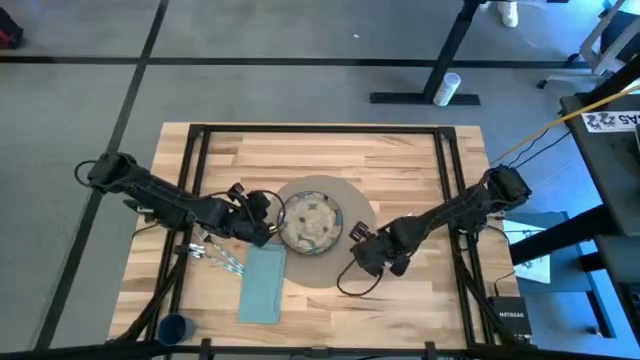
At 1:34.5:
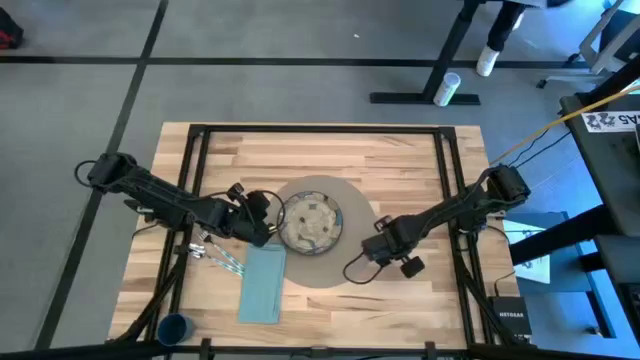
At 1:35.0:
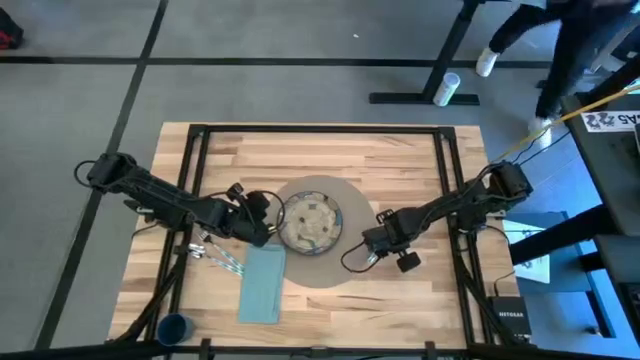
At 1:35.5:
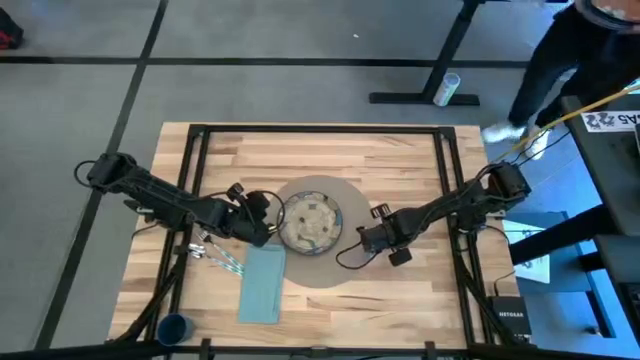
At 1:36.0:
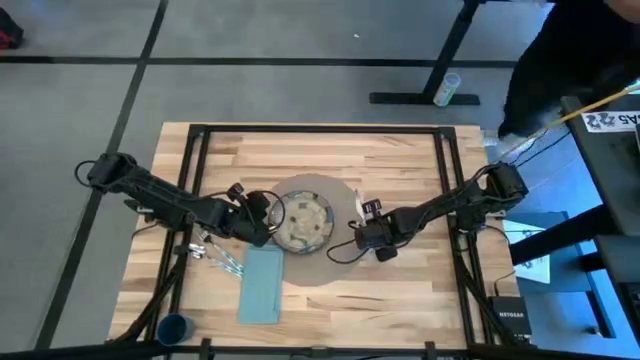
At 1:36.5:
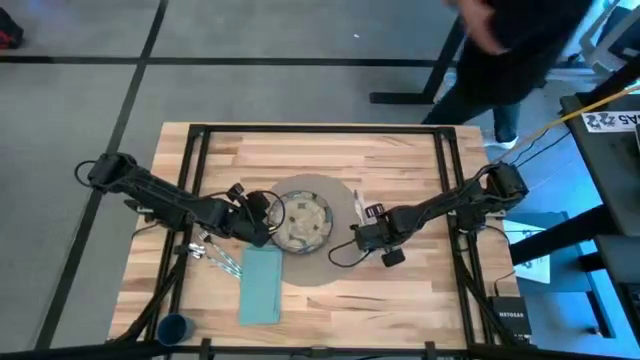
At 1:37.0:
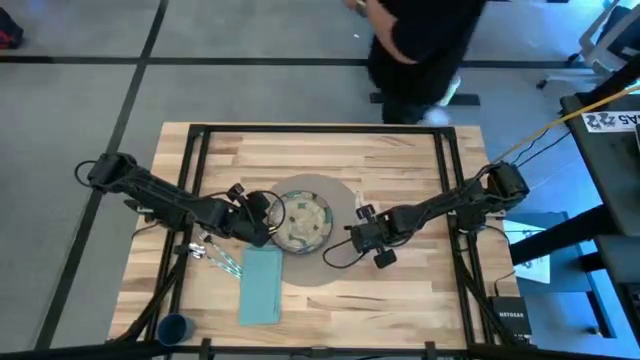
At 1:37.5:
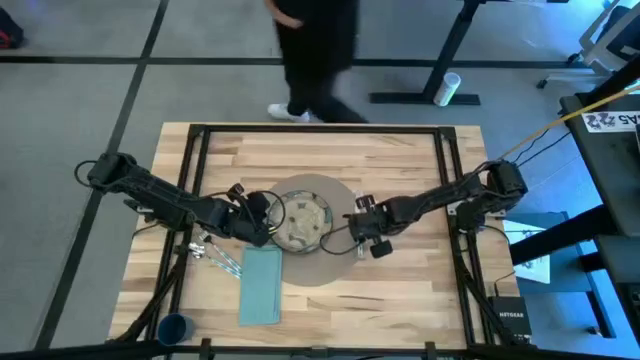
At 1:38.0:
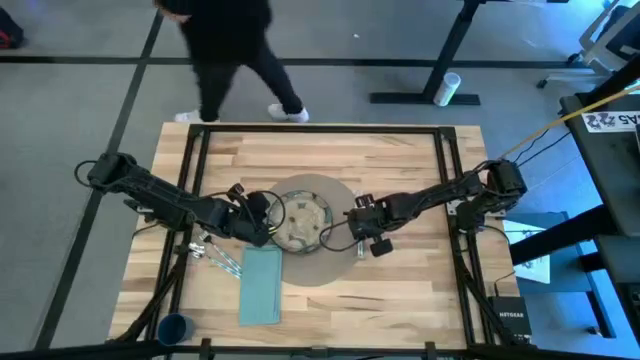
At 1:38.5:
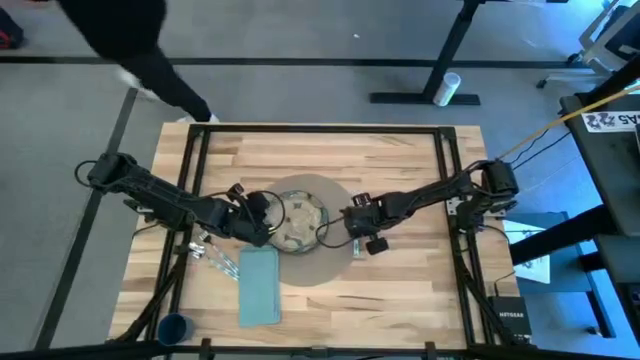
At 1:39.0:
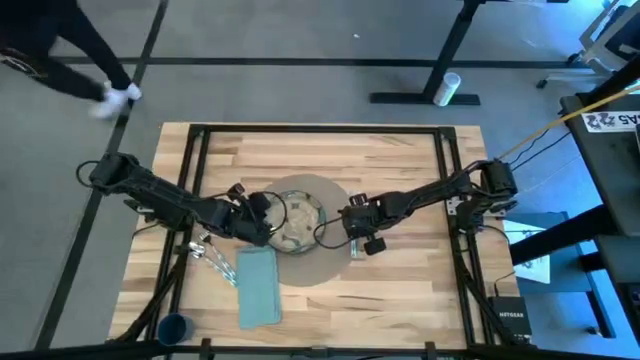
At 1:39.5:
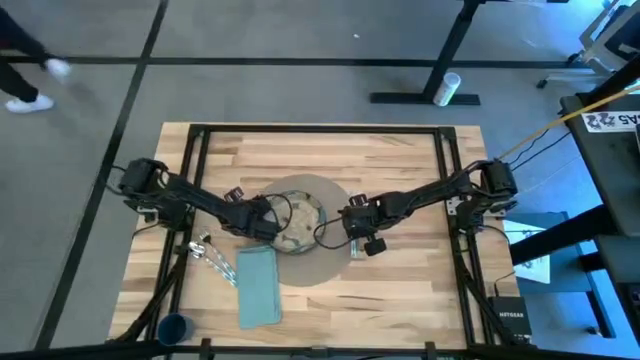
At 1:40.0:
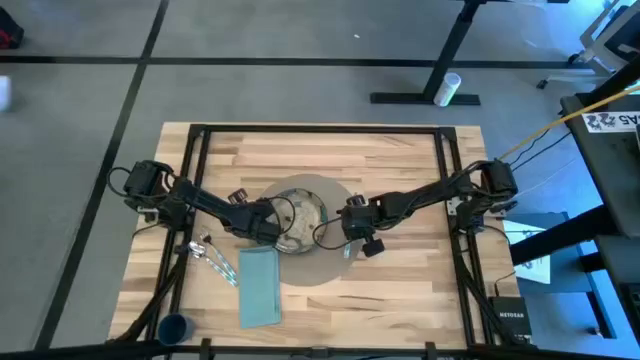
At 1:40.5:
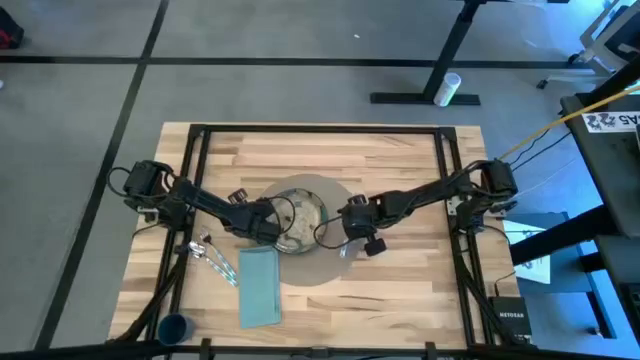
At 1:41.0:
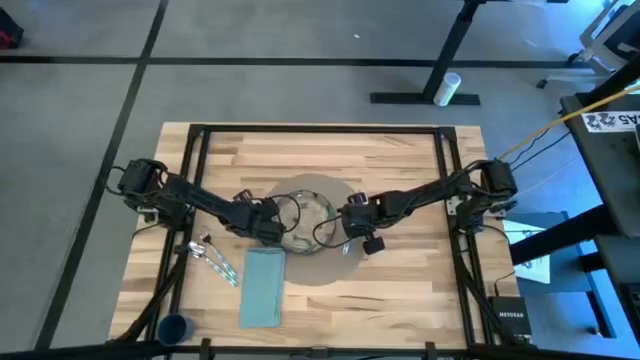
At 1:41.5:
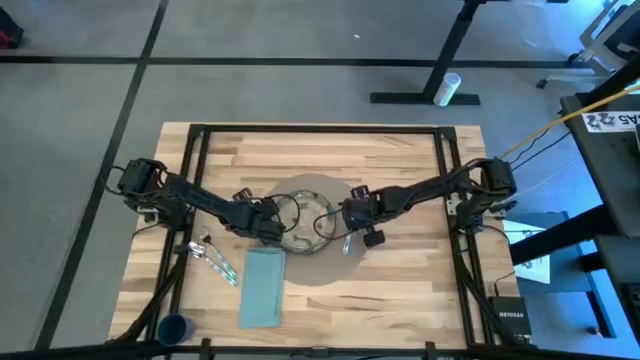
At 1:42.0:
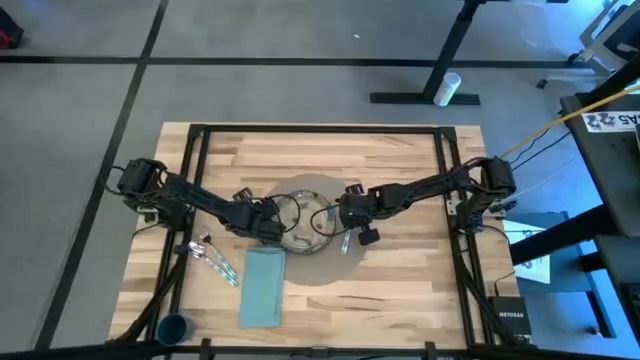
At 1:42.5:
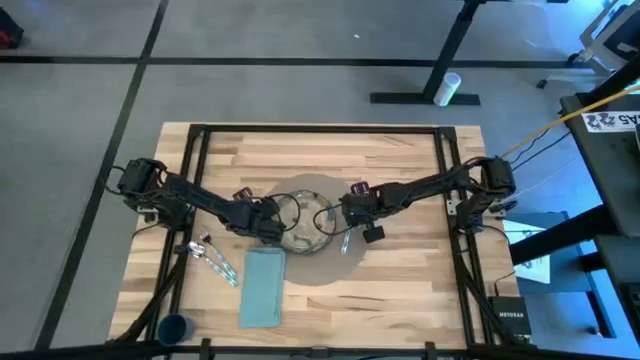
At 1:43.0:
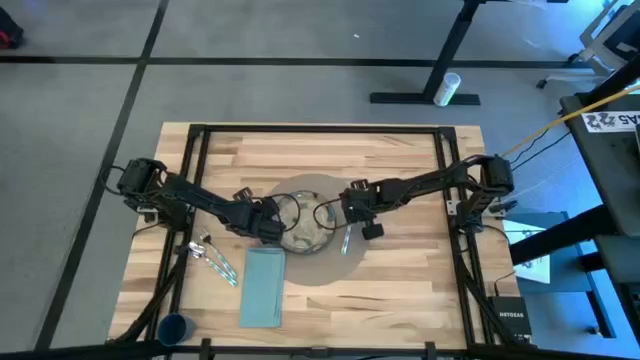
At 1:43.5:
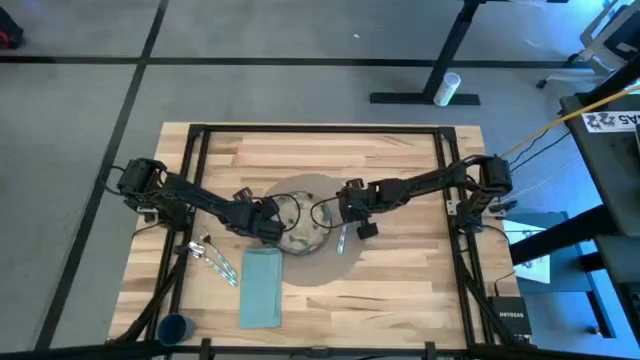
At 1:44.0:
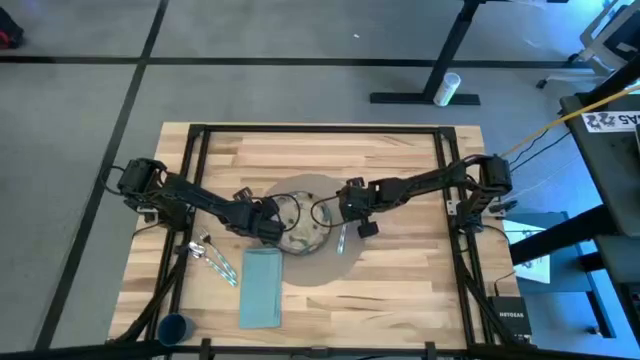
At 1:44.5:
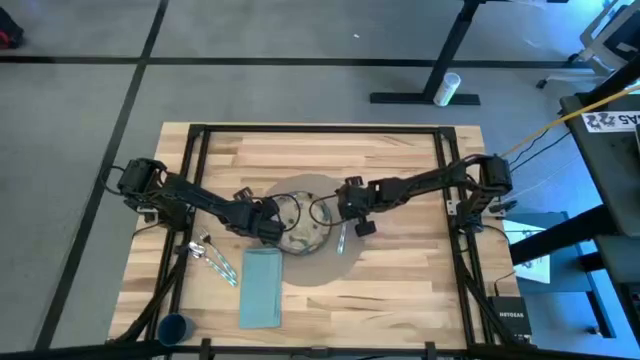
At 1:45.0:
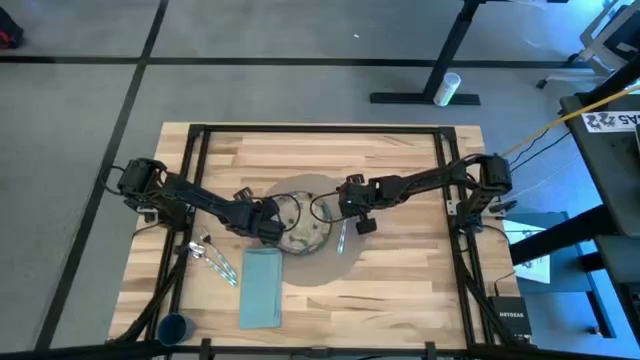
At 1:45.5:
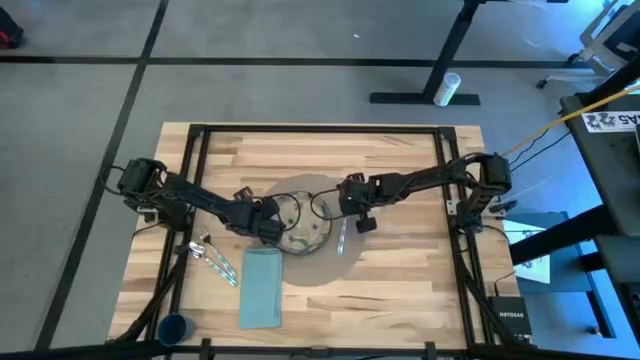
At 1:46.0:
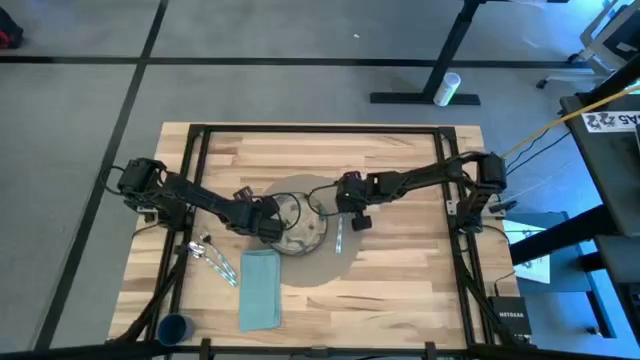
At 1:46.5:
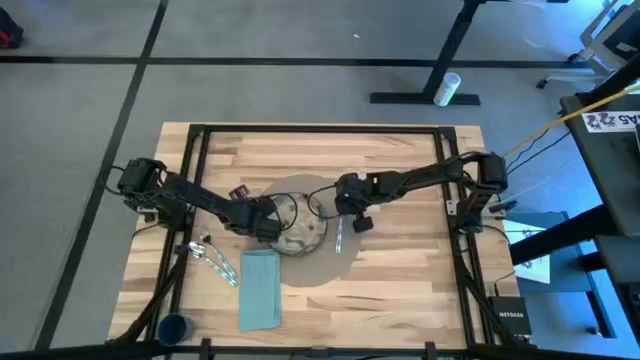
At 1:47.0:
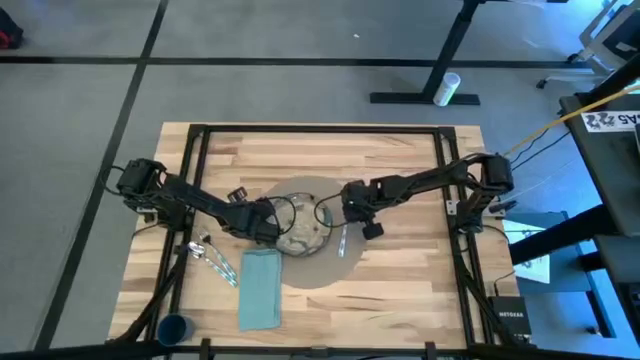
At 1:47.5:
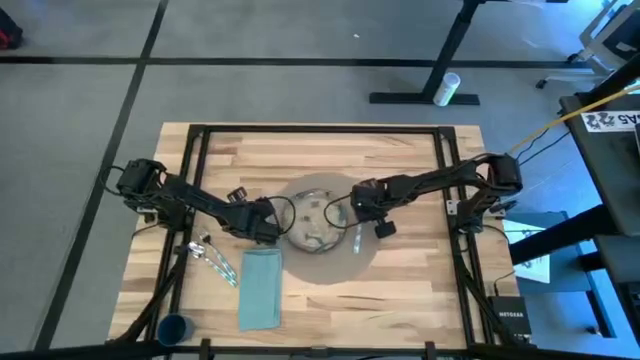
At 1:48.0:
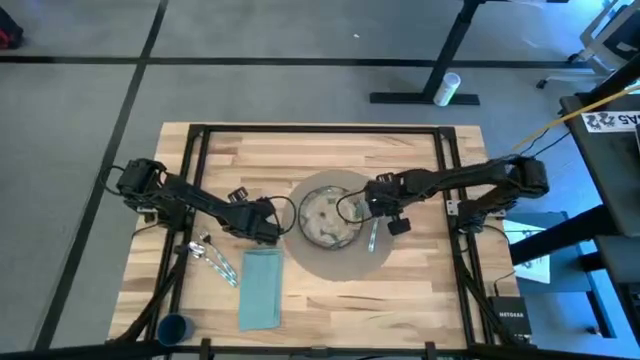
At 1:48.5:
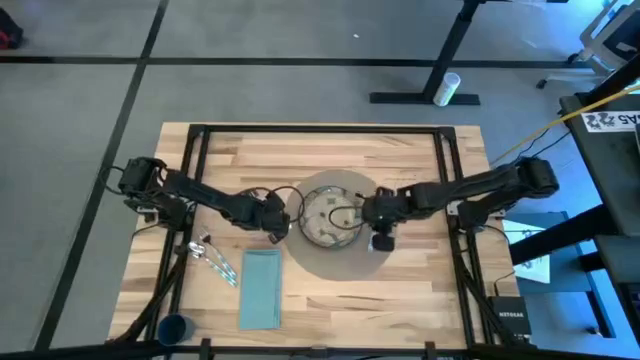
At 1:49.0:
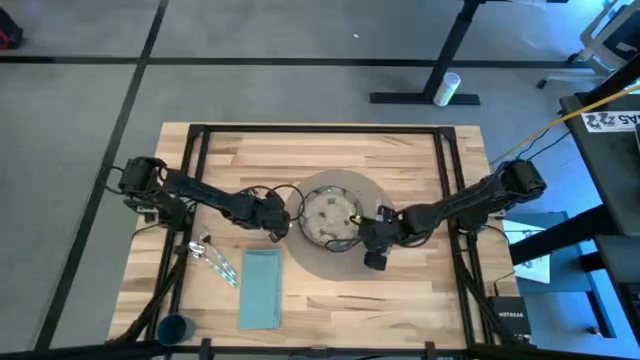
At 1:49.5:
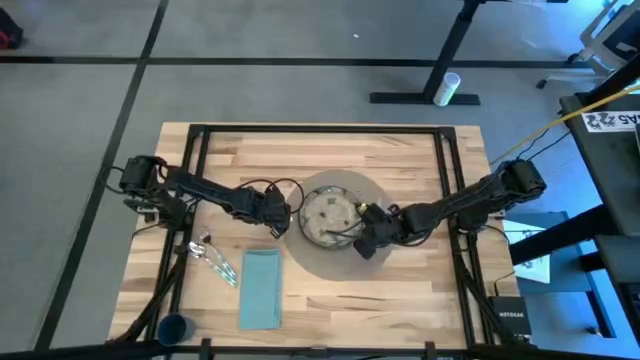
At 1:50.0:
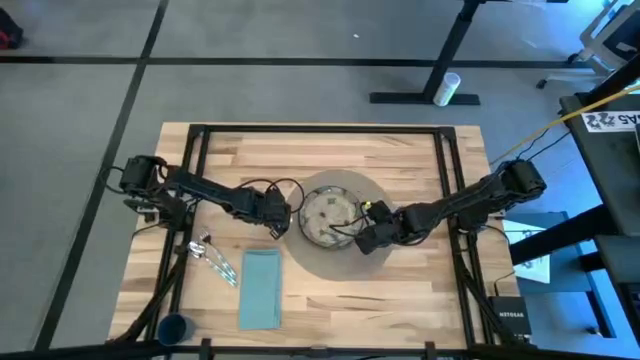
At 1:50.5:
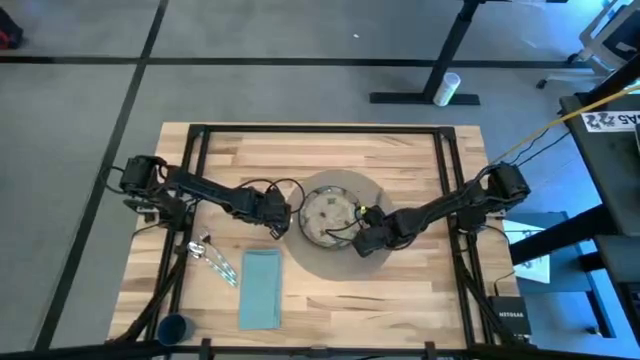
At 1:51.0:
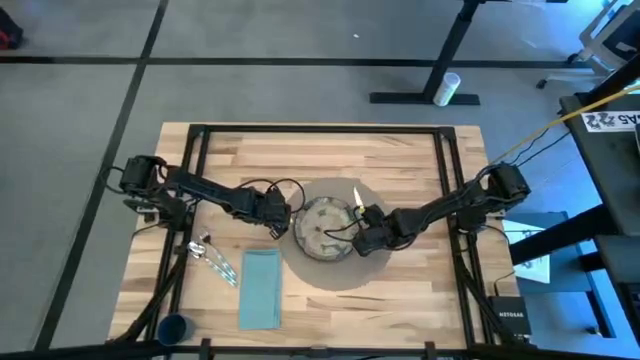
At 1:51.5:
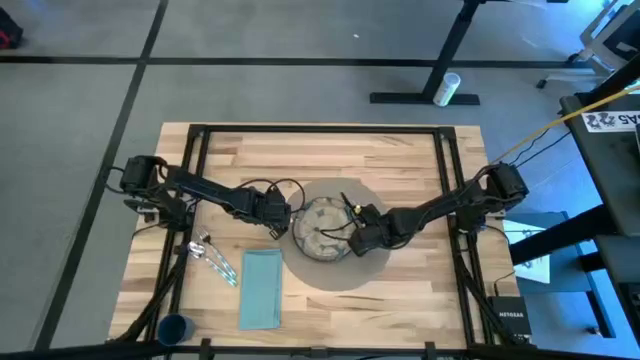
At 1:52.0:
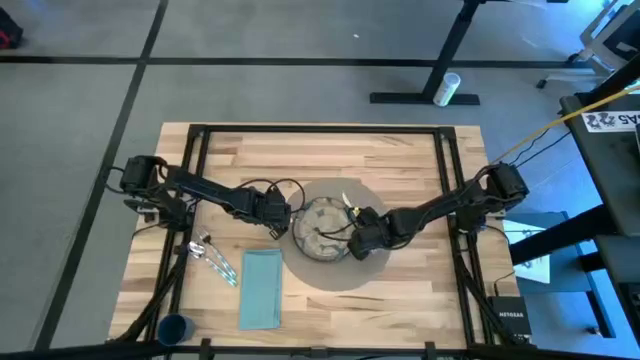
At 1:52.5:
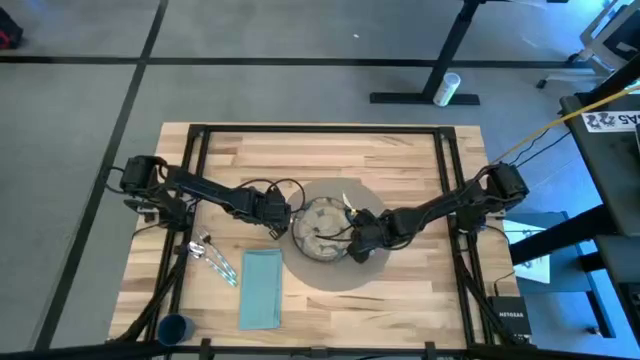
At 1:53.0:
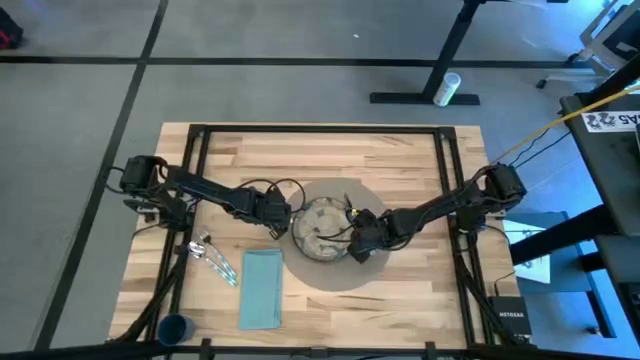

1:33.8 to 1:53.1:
Task: Set table place
Put the blue patterned table knife on the brown tablemat to the right of the white patterned plate

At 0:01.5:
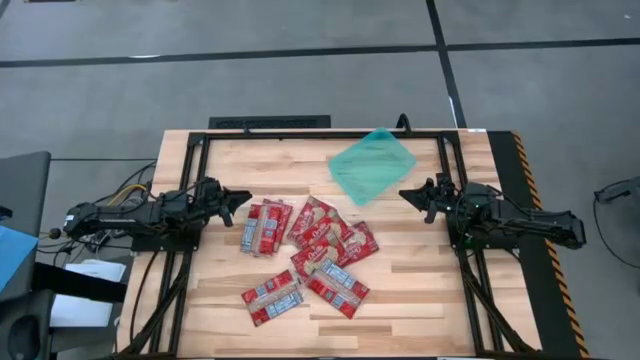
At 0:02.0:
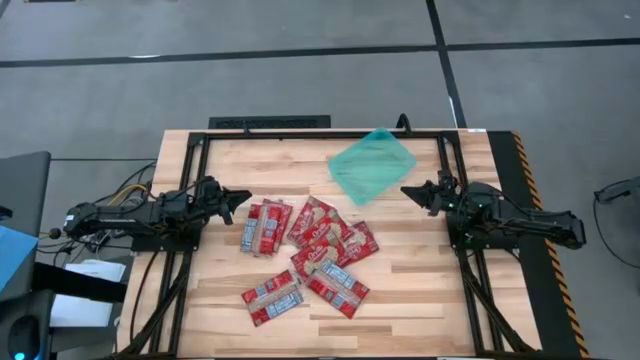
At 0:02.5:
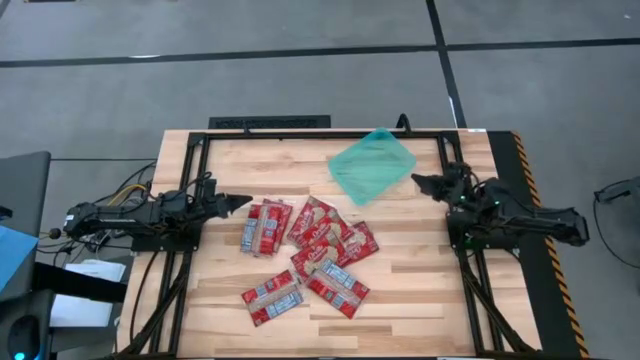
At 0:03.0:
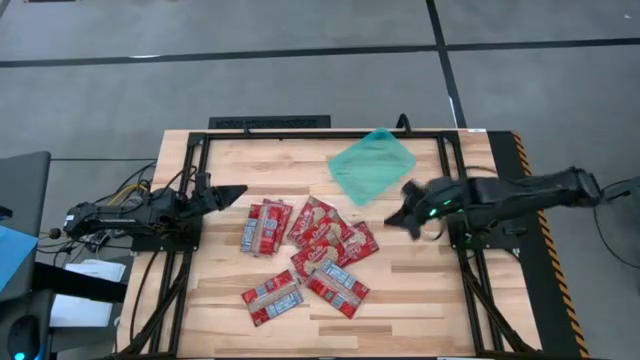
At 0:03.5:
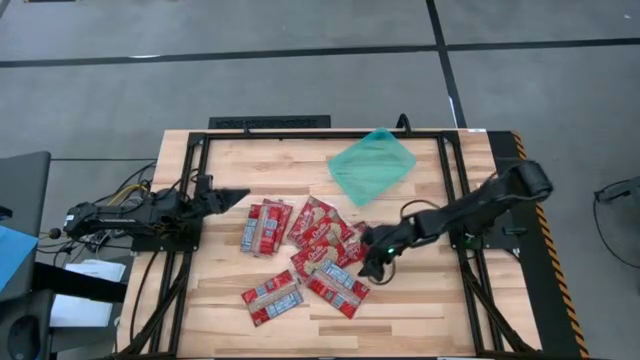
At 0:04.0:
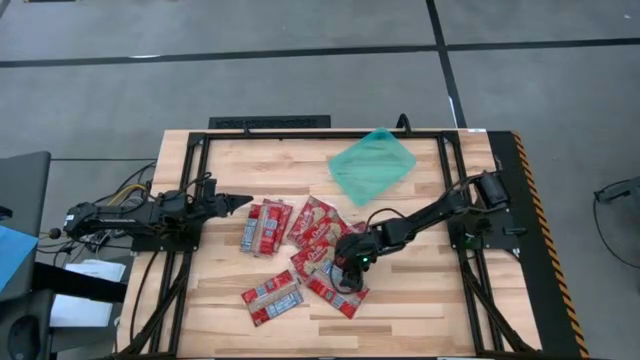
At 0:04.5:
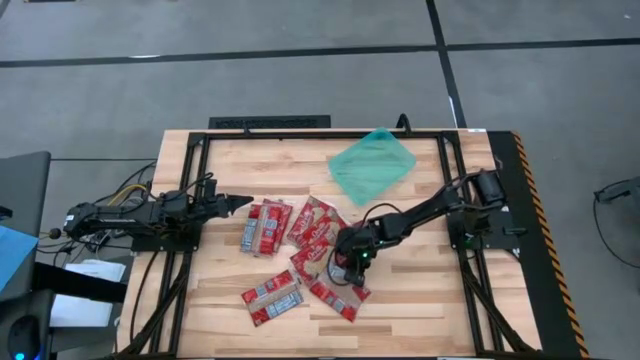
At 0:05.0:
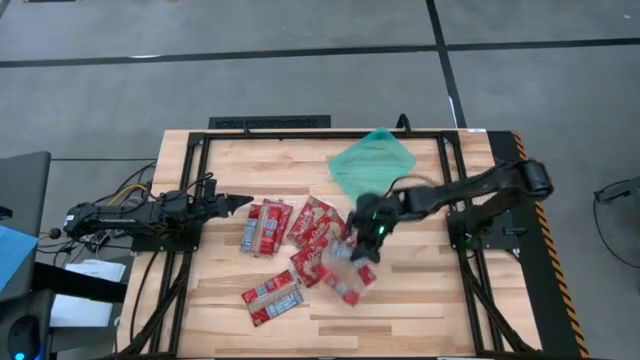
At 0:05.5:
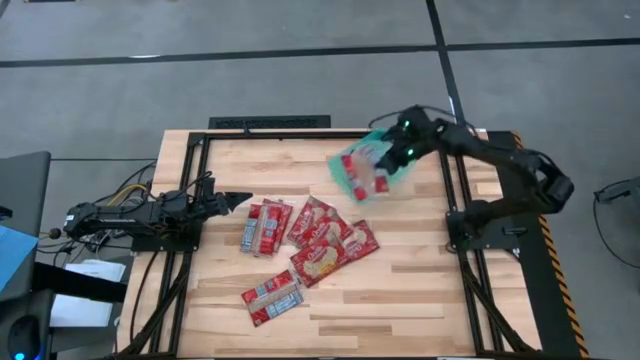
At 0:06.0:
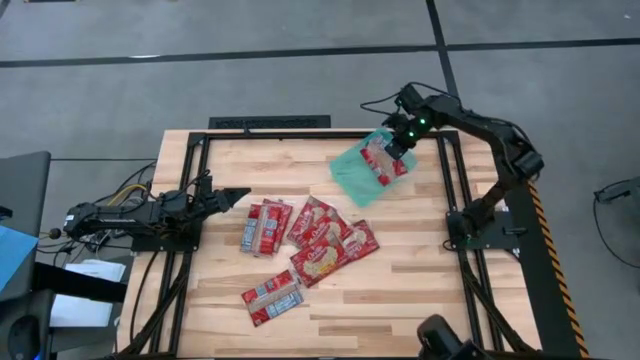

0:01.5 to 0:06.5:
Task: Sort popcorn bags into baskets
Put the red popcorn bag into the green bin
